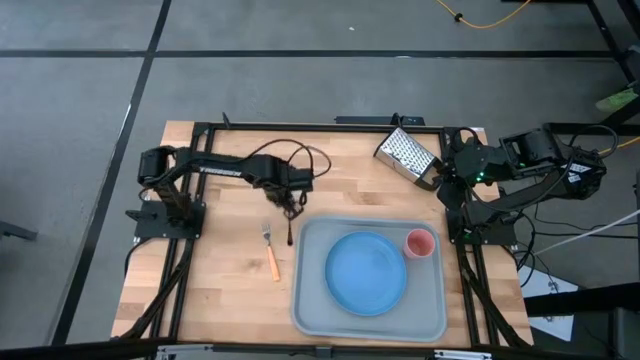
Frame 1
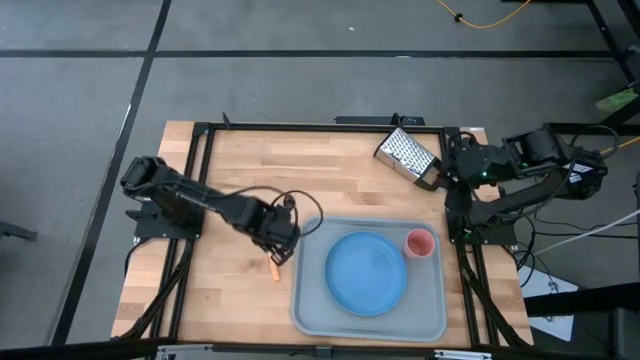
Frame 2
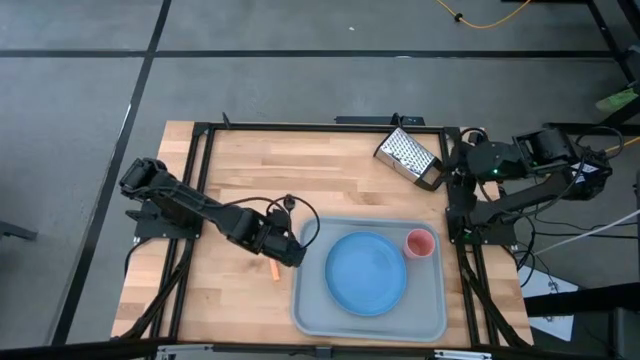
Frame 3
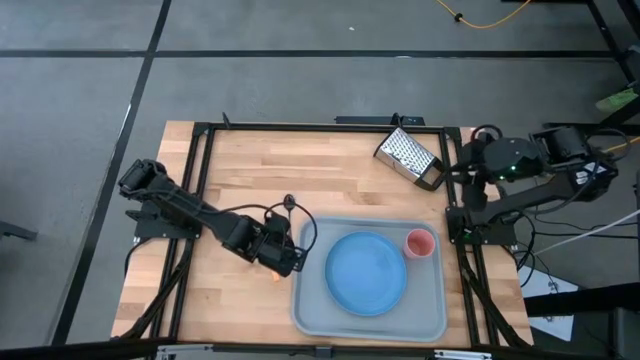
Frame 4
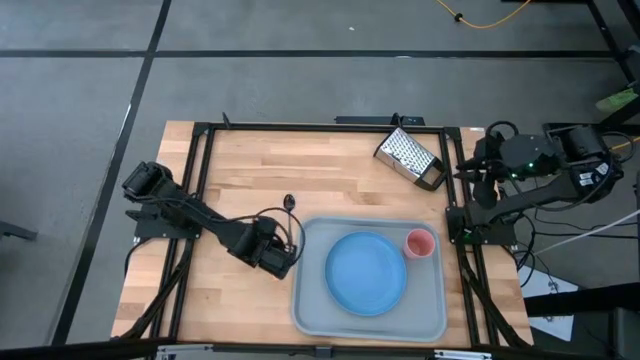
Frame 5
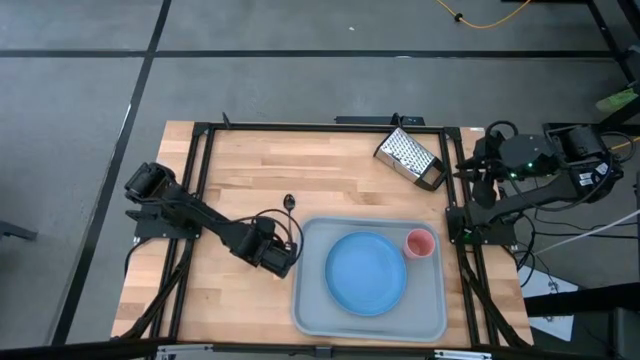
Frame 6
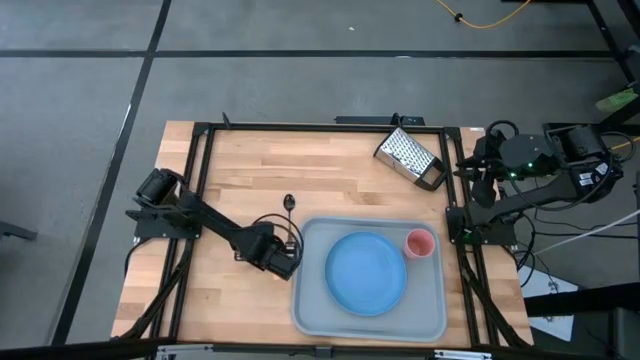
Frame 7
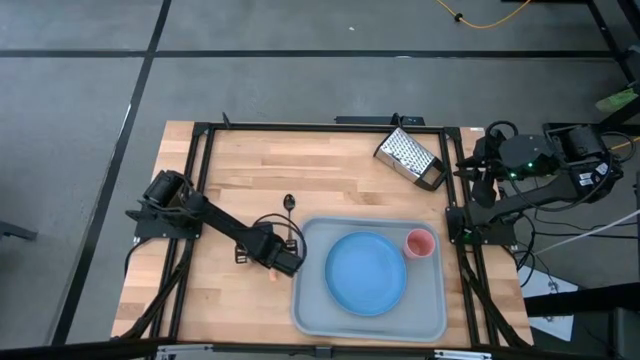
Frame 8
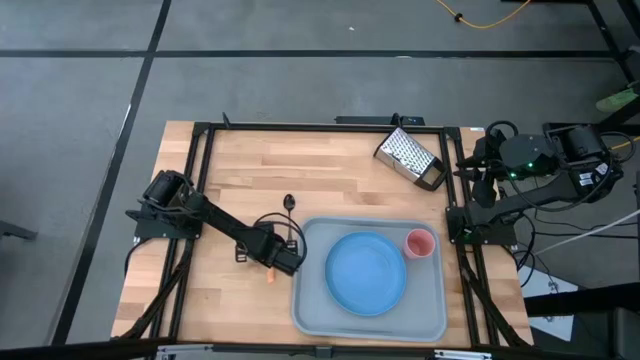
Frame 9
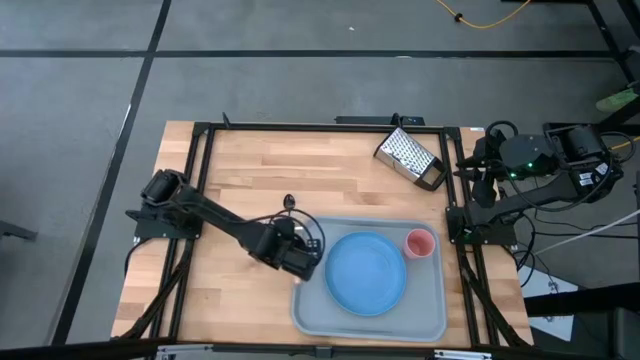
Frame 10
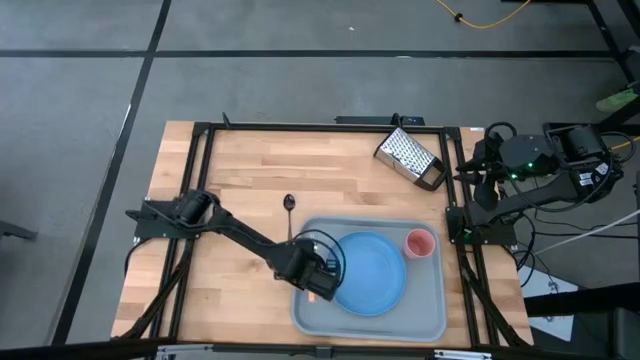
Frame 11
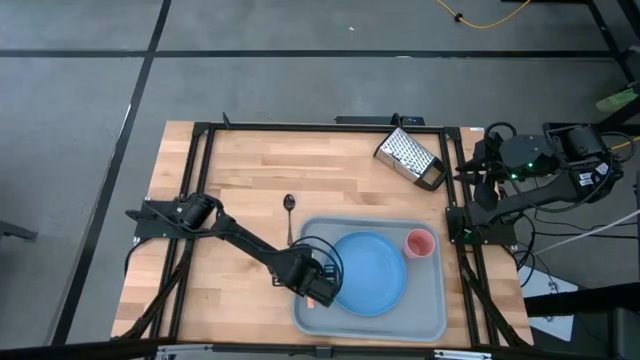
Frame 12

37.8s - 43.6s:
Task: Pick and place plate/cup/fork/spoon on tray
Put the orange fork on the gray tray to the left of the blue plate

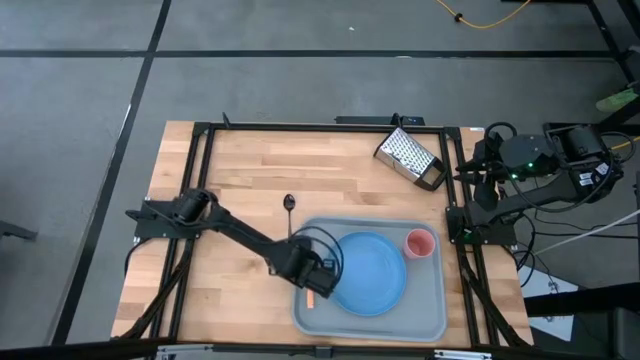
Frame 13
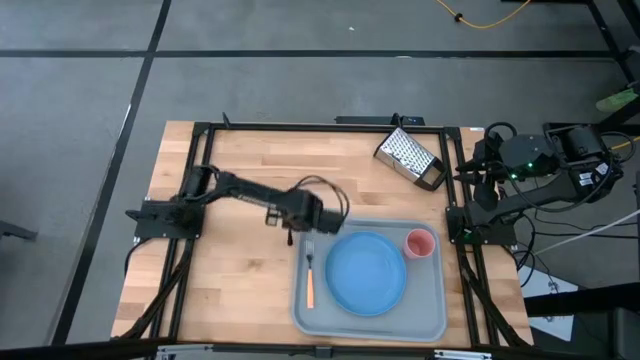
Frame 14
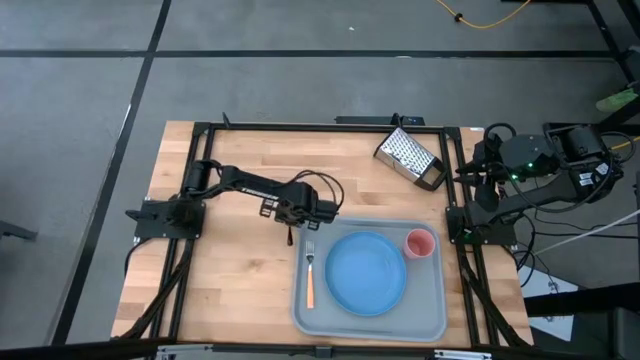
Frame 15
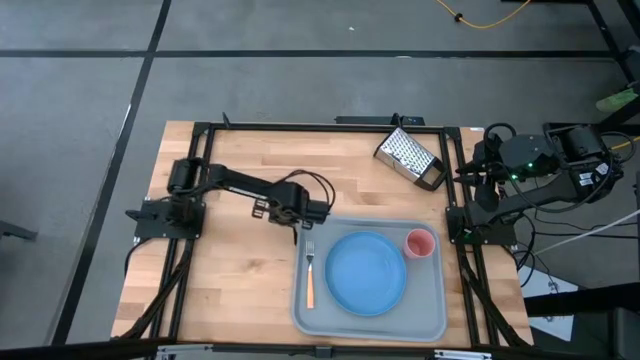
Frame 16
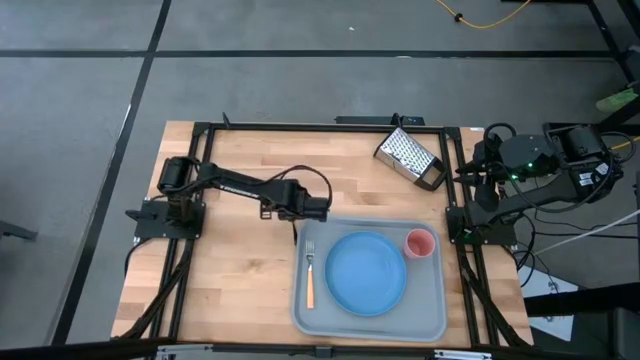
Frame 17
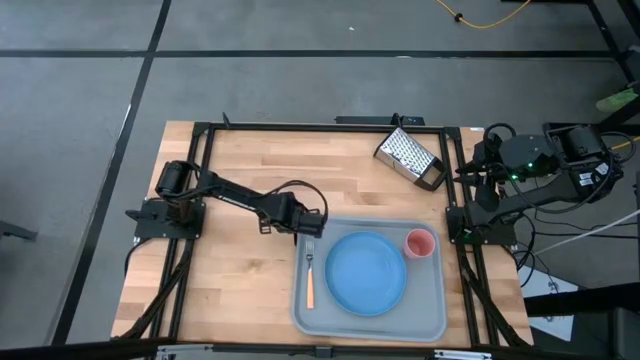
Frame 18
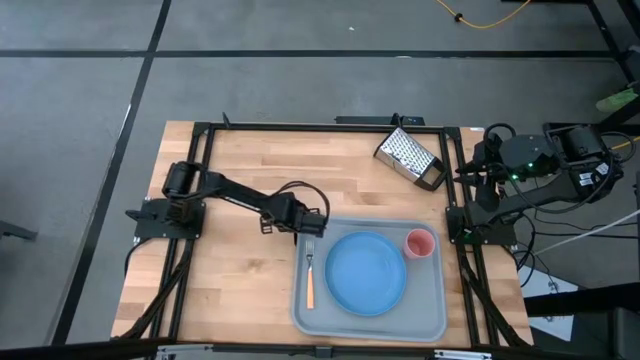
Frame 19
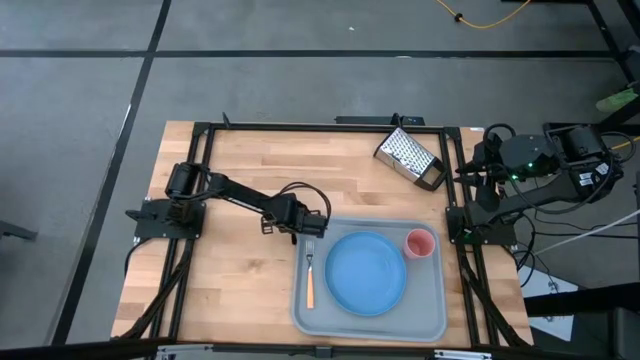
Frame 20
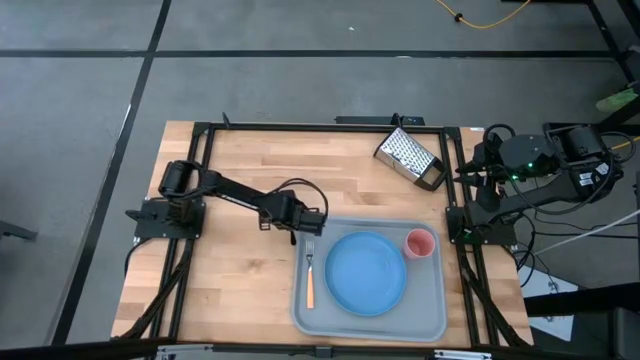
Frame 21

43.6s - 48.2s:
Put the black spoon on the gray tray to the left of the blue plate

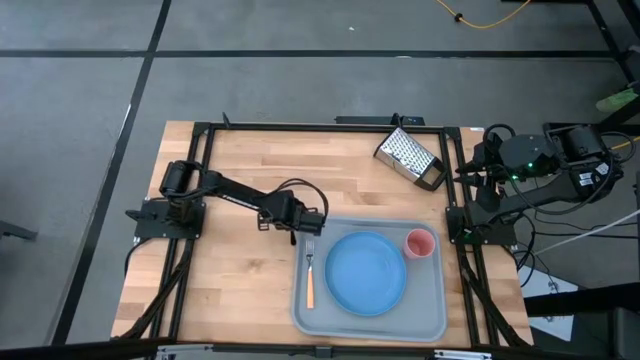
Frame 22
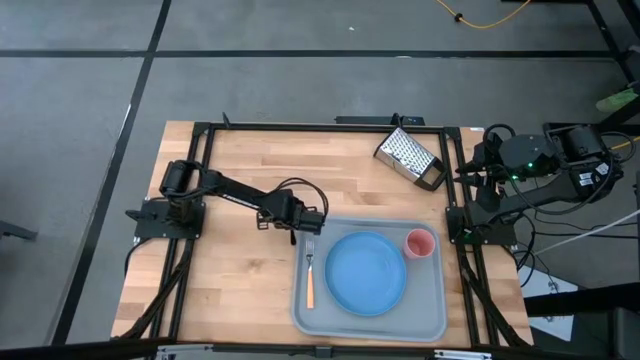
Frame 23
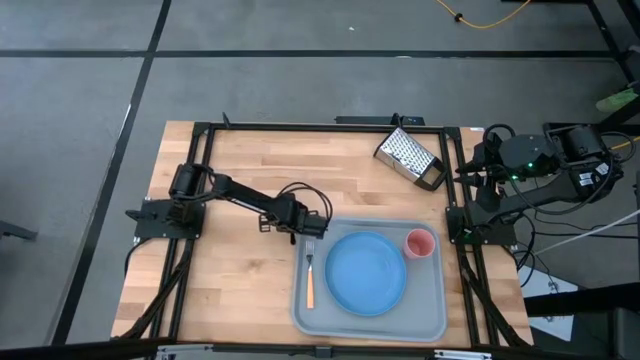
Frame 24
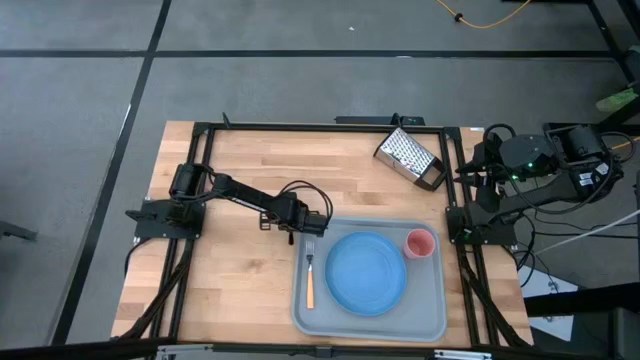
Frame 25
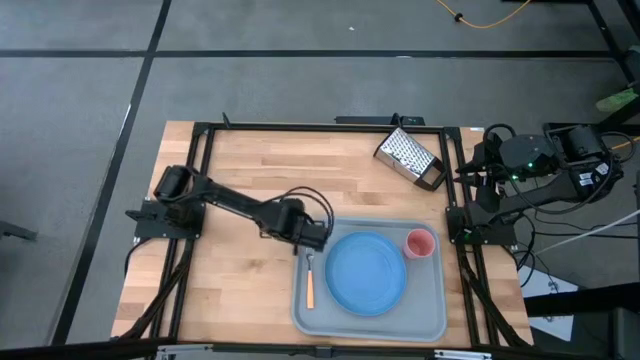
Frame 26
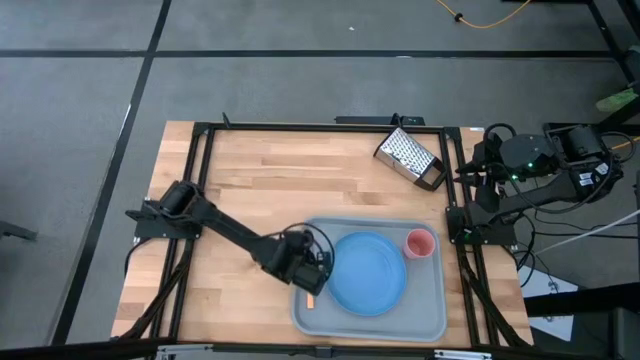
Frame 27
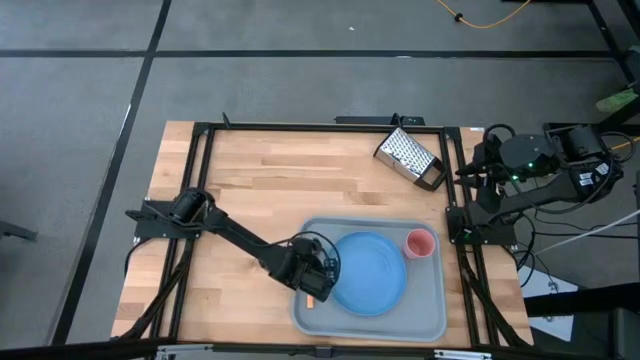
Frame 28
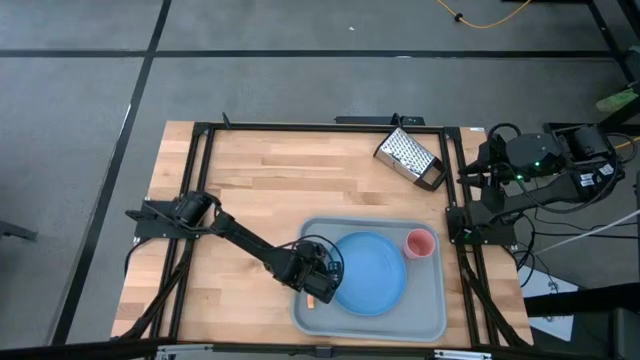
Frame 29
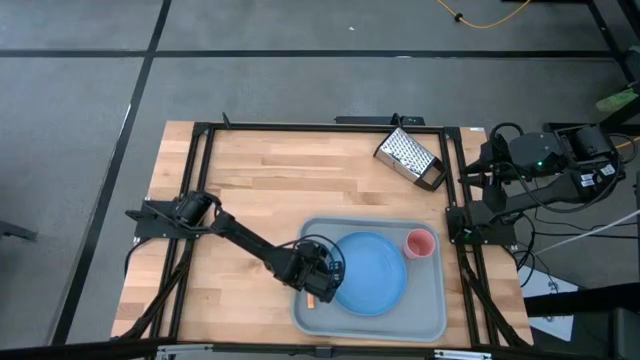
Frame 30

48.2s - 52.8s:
Put the black spoon on the gray tray to the left of the blue plate

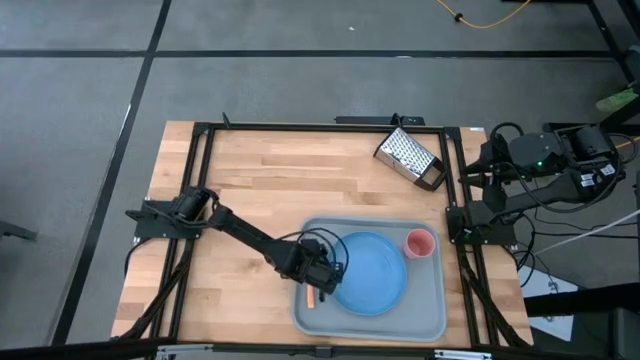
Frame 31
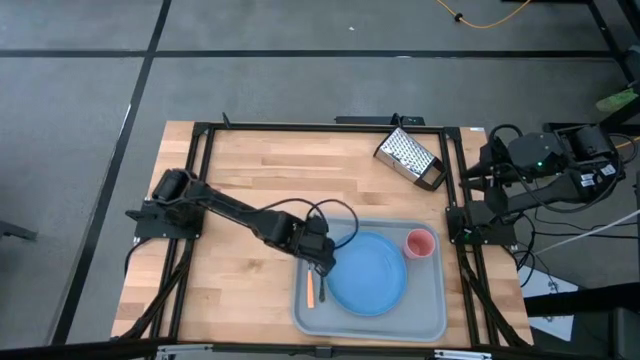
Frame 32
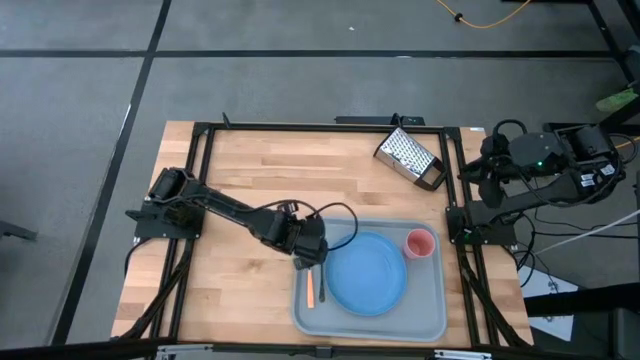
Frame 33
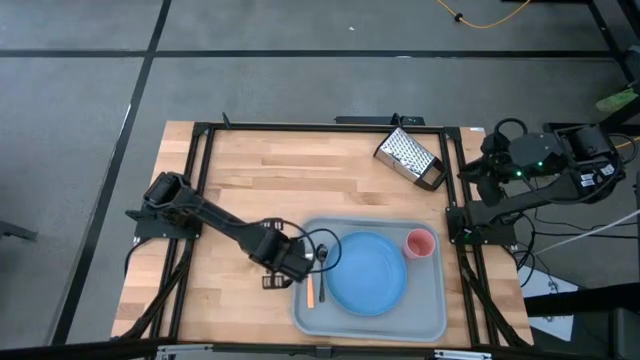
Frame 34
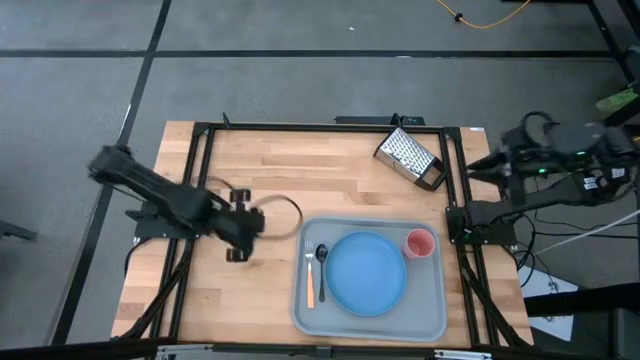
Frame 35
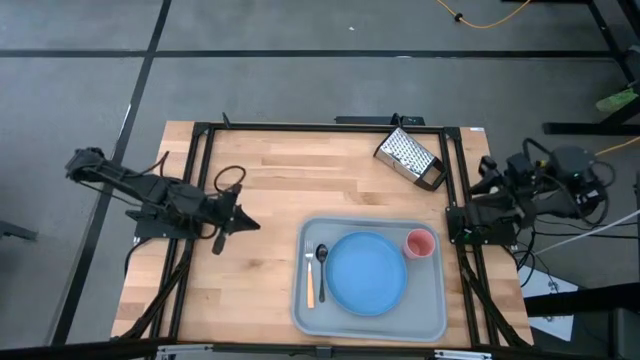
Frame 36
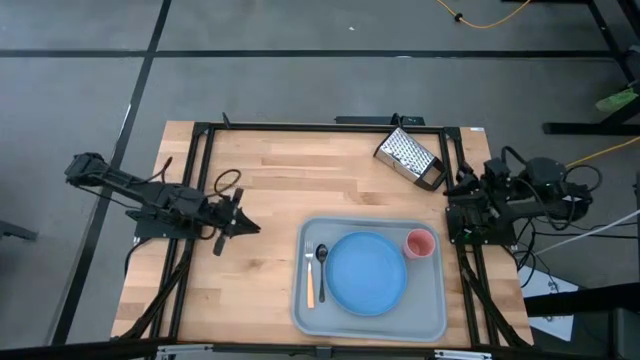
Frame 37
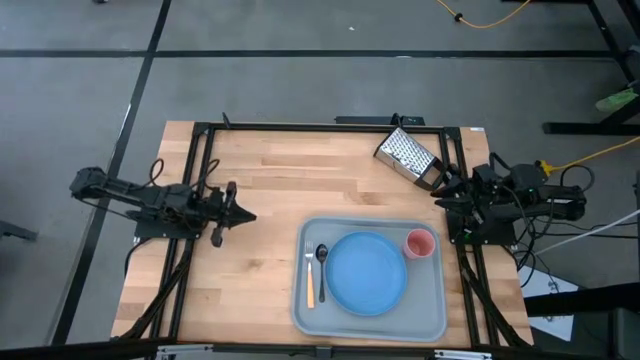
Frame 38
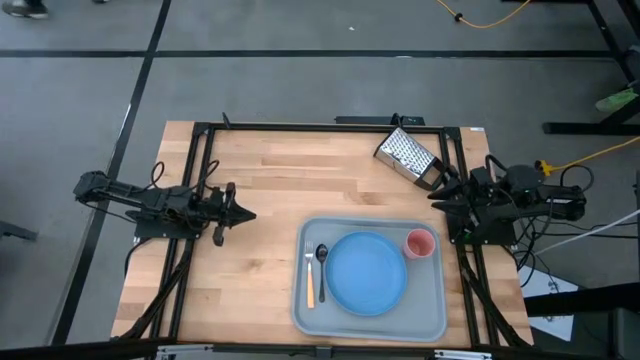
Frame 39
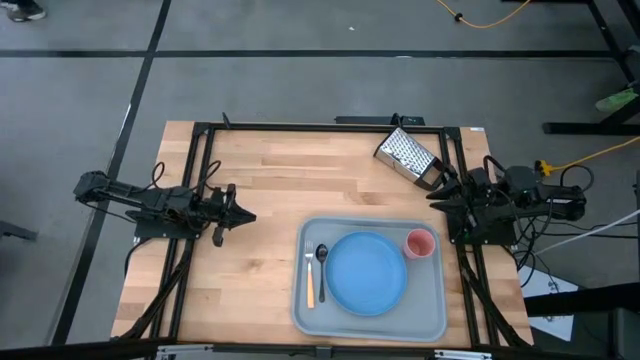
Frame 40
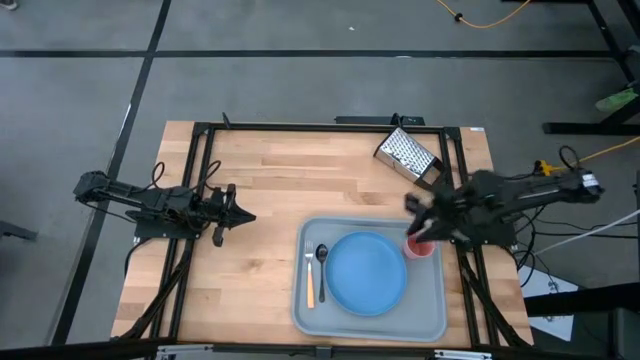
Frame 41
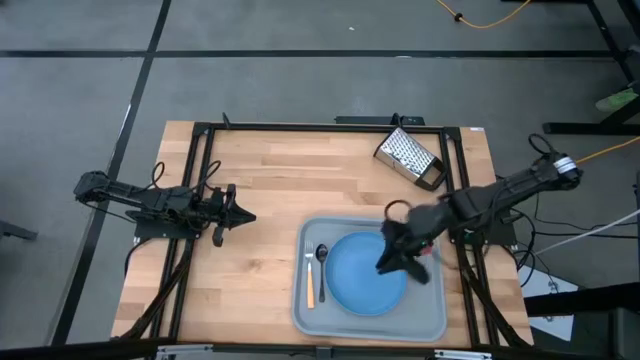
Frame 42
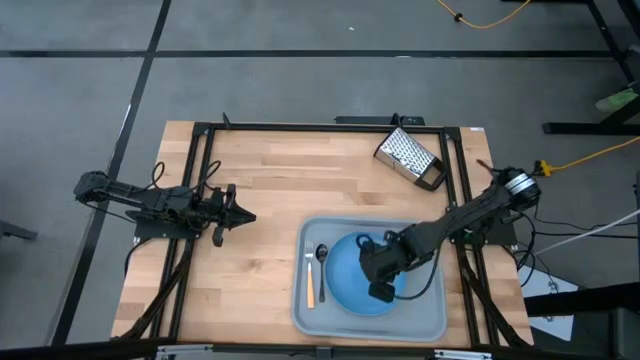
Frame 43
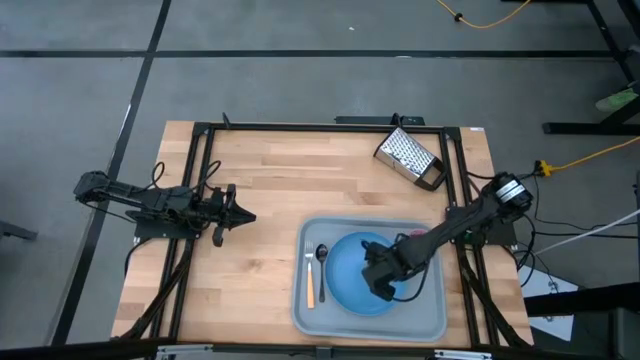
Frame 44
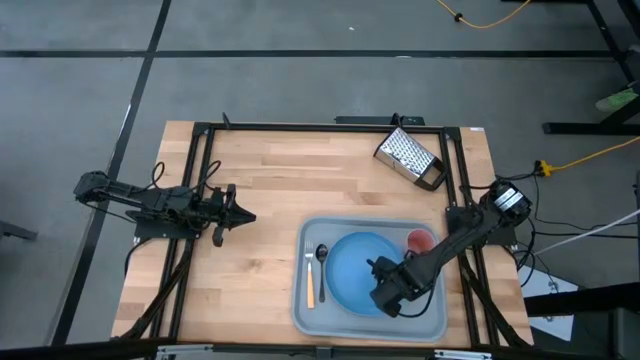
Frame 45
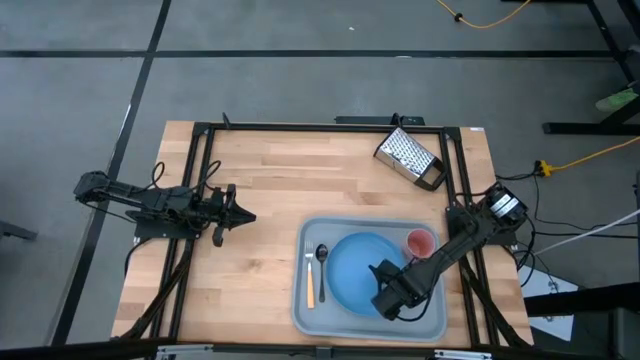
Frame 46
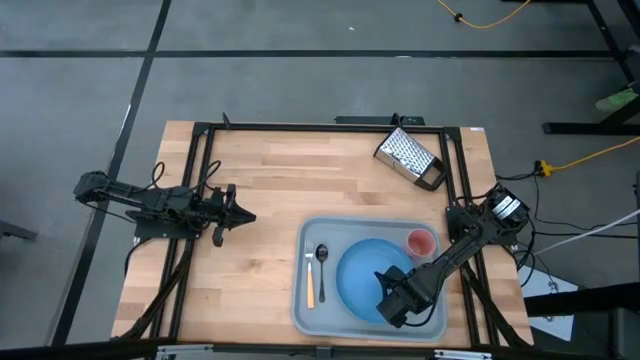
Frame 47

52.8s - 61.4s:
Adjust the blue plate on the gray tray
